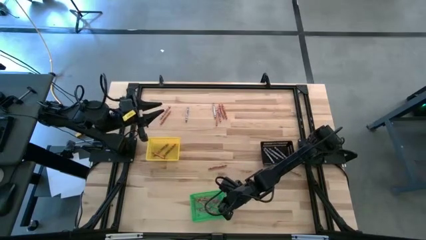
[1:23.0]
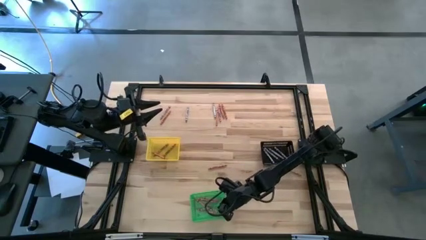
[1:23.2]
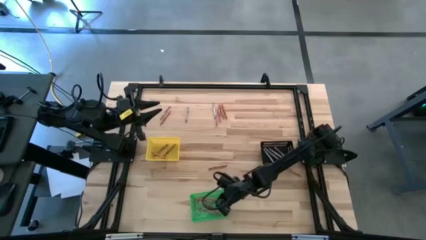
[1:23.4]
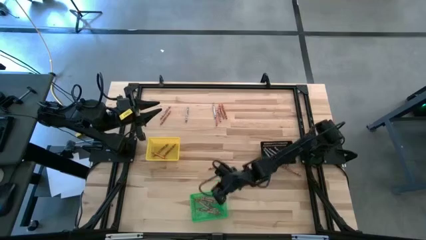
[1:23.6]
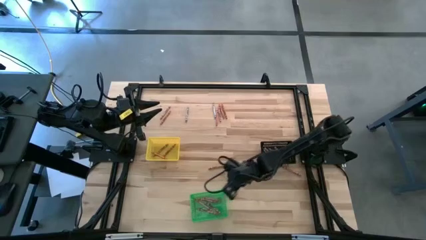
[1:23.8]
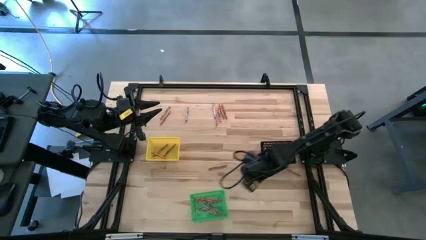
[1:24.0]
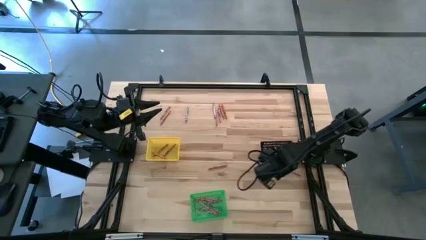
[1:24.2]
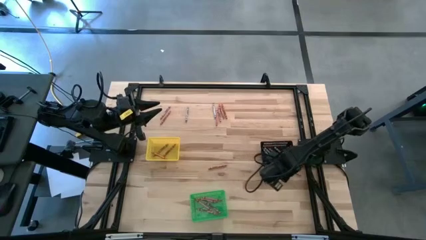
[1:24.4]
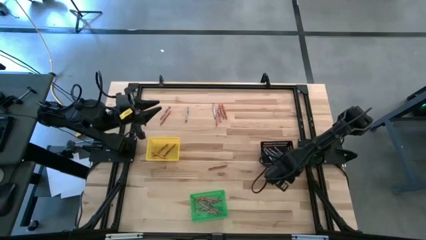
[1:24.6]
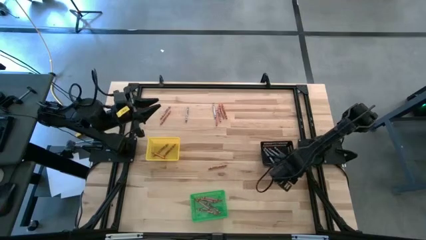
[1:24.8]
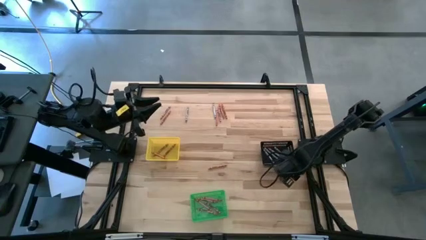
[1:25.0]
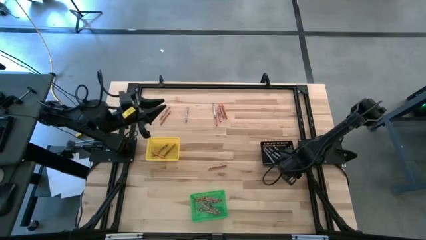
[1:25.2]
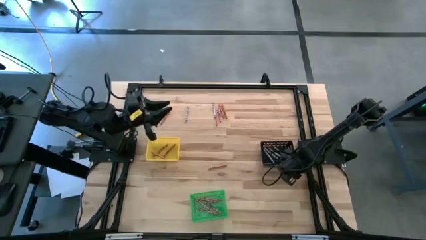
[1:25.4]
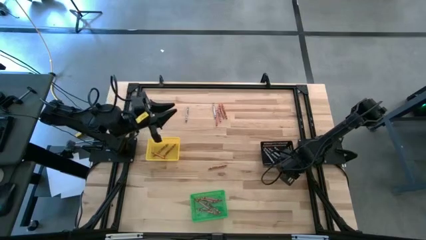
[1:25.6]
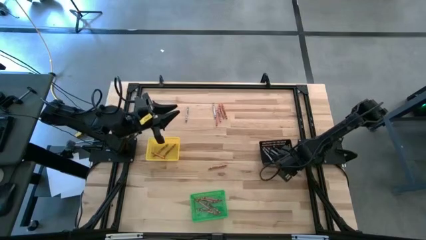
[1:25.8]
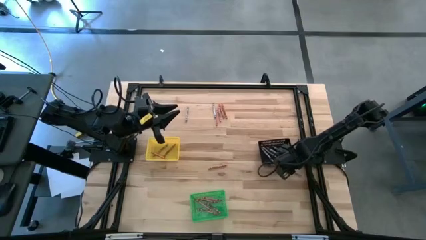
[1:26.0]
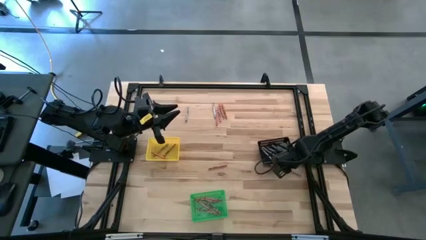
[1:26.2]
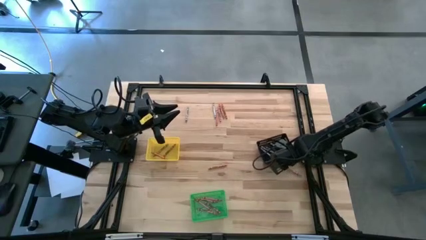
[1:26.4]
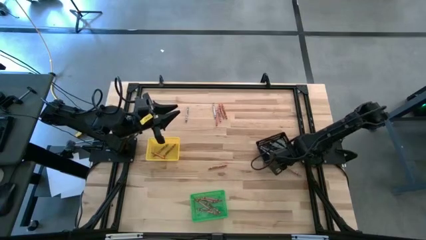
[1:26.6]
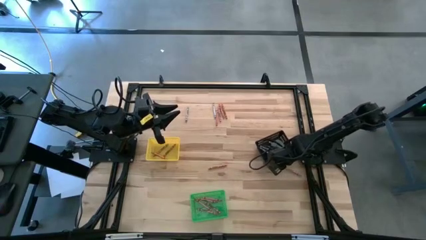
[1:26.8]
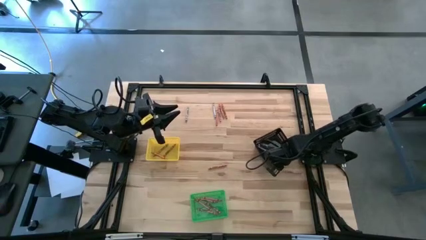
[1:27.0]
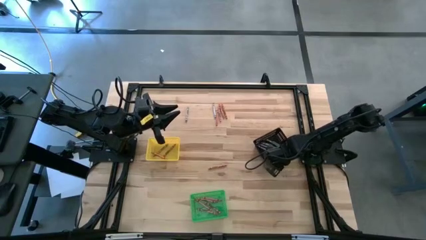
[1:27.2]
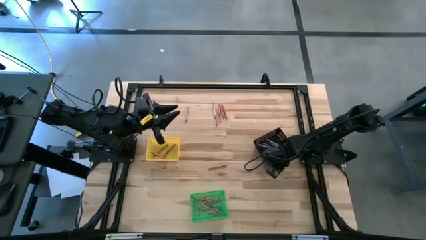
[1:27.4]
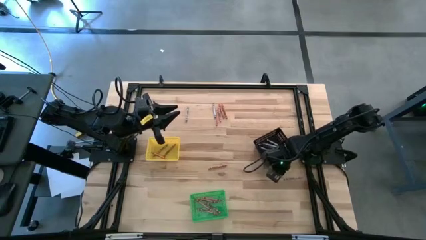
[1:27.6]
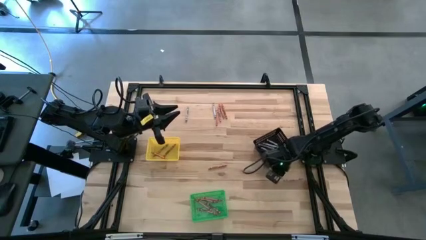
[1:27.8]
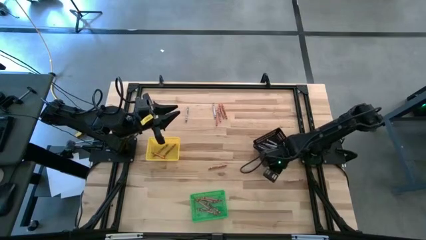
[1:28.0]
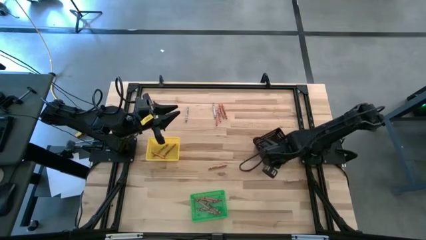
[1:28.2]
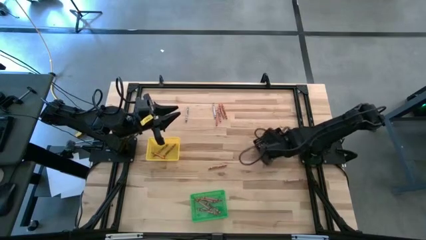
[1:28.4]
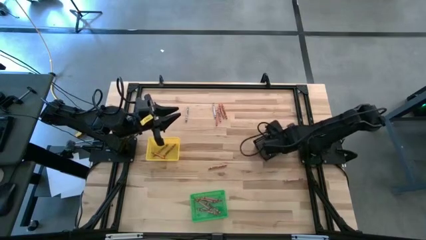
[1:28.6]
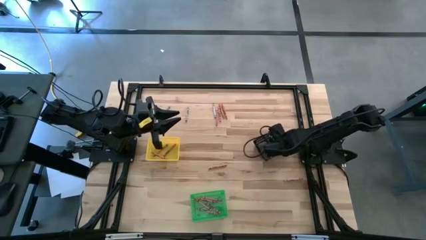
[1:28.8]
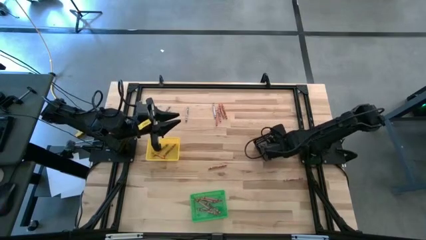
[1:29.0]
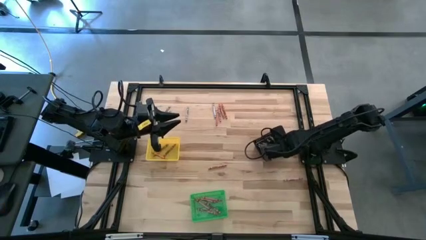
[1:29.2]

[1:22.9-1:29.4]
Task: Sort crayons
Put the bottom gray crayon into the black bin

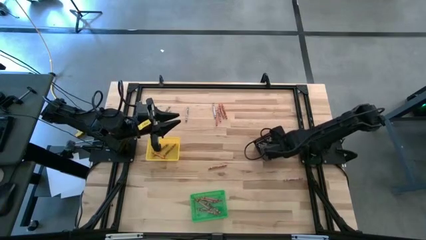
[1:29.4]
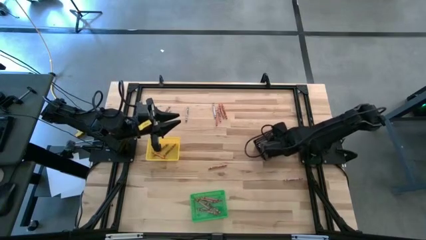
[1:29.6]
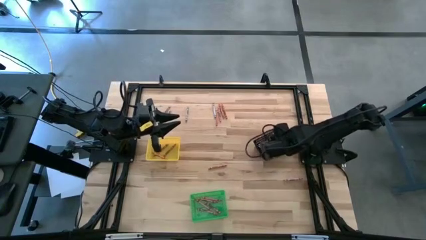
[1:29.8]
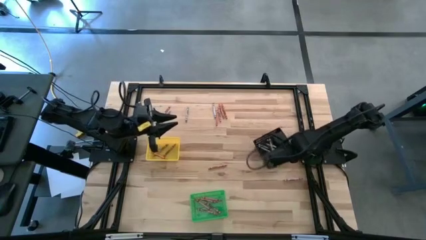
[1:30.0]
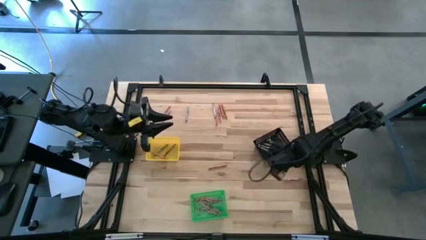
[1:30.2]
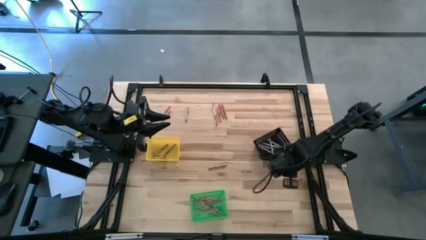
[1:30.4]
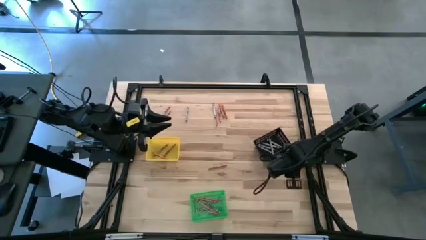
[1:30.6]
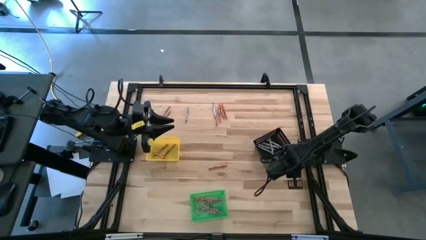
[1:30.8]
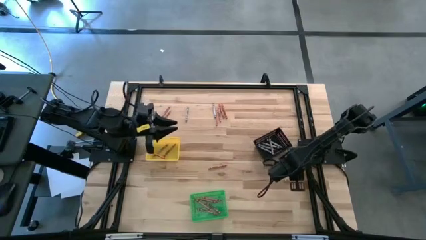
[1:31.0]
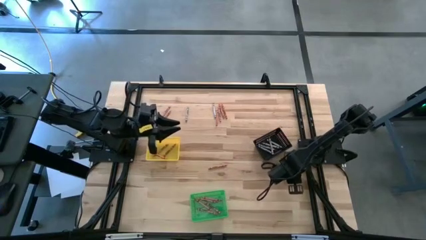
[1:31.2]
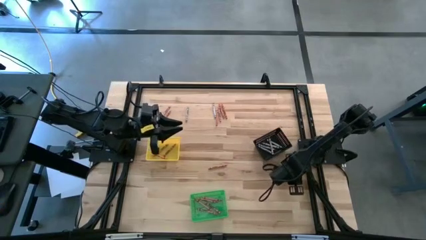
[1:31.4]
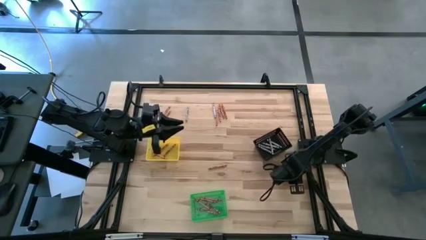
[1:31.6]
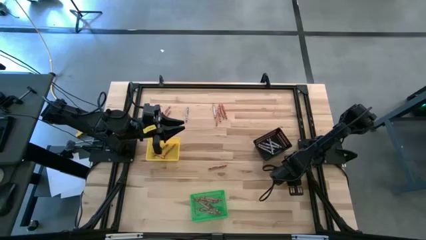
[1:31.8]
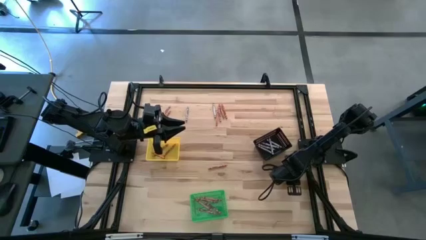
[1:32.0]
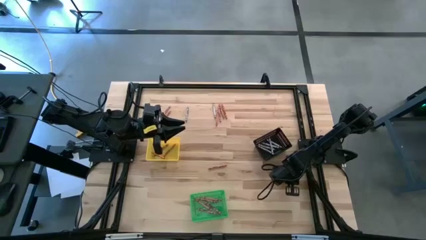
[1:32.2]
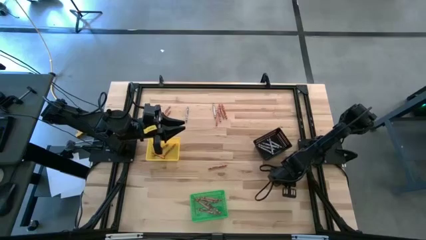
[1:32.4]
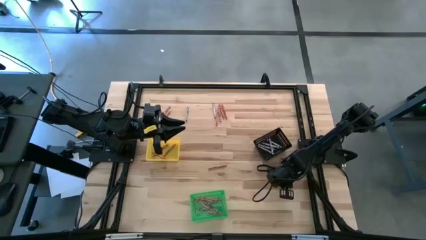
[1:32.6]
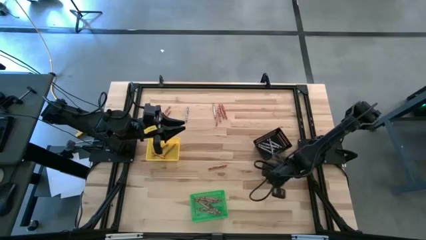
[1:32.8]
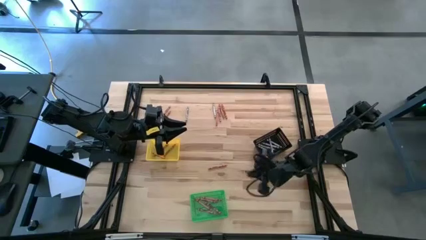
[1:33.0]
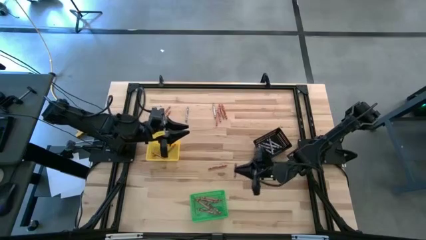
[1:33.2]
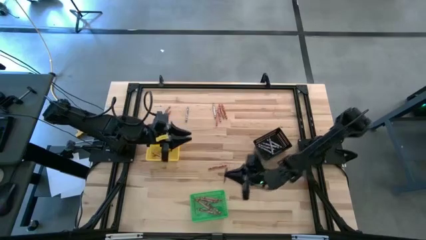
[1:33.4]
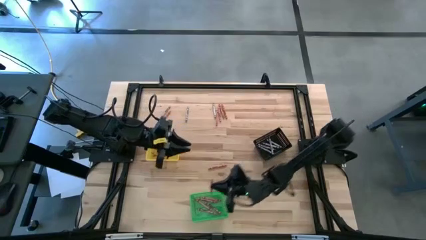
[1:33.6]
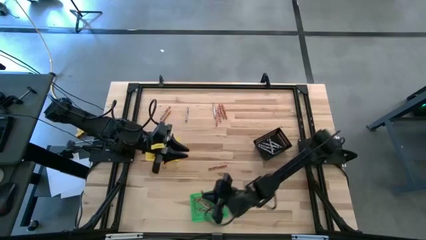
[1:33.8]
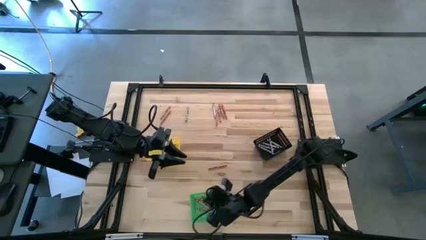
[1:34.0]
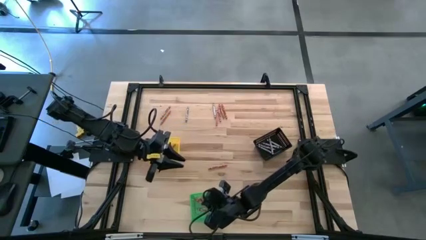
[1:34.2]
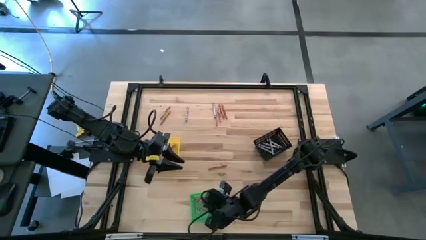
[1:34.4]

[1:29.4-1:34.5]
Put the bottom pink crayon into the green bin

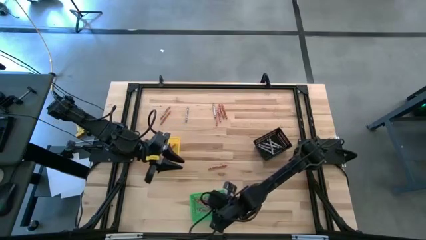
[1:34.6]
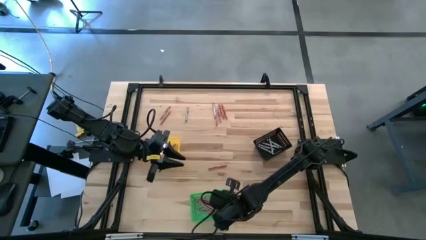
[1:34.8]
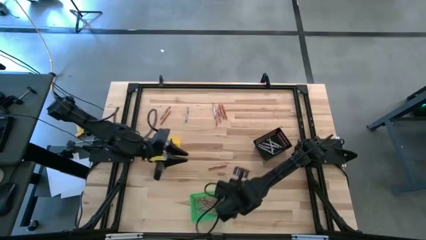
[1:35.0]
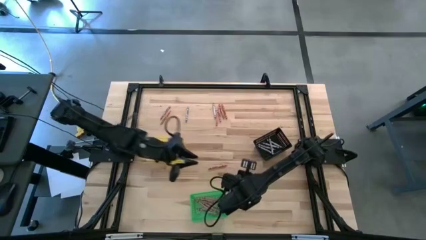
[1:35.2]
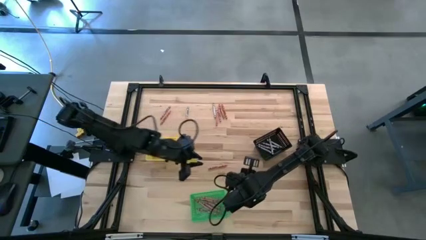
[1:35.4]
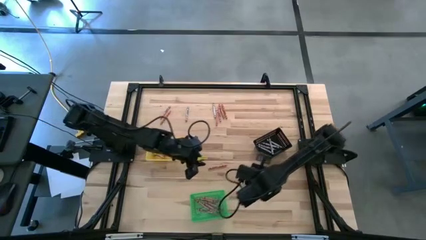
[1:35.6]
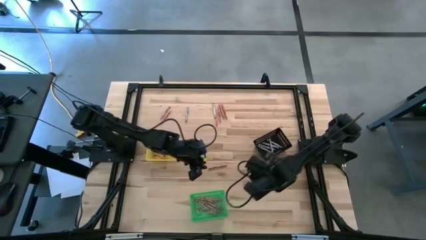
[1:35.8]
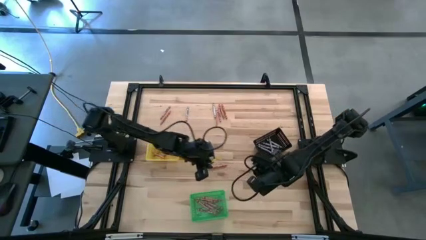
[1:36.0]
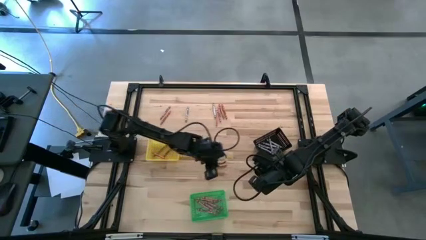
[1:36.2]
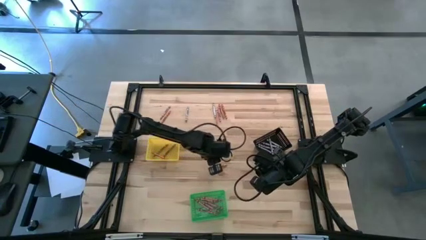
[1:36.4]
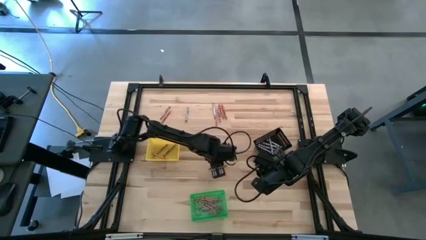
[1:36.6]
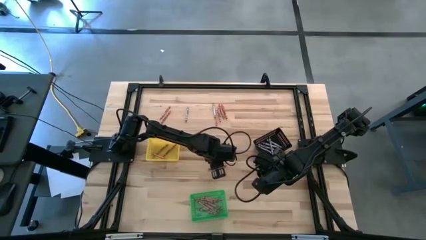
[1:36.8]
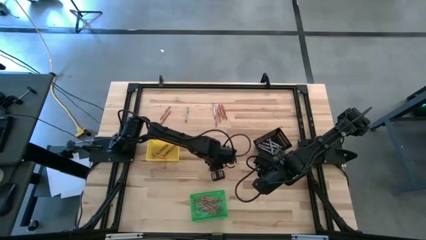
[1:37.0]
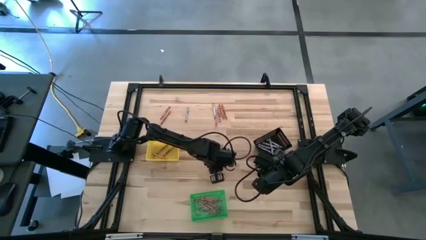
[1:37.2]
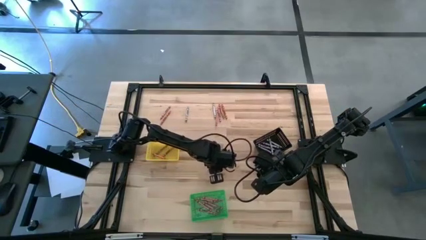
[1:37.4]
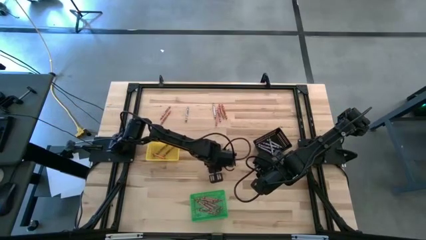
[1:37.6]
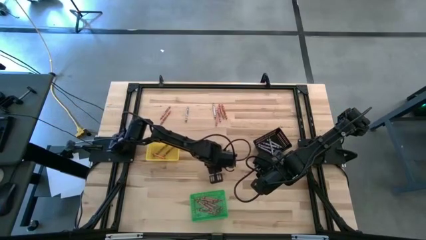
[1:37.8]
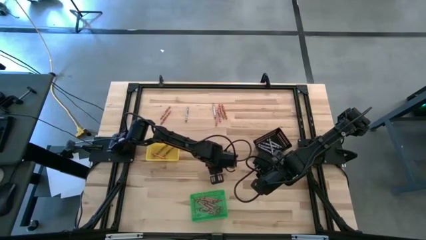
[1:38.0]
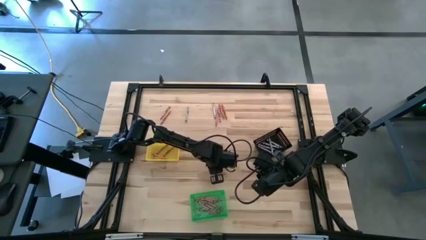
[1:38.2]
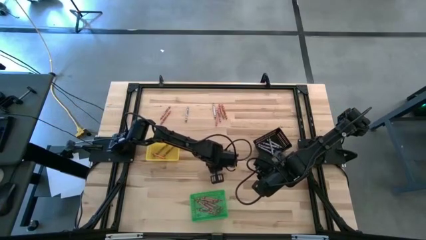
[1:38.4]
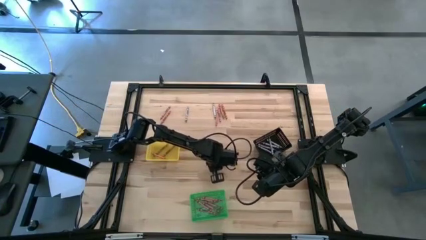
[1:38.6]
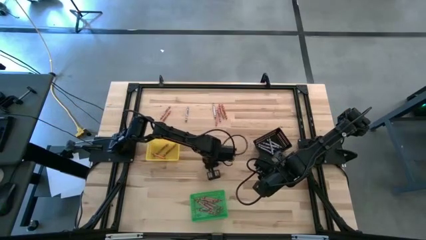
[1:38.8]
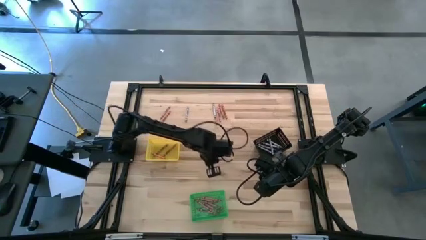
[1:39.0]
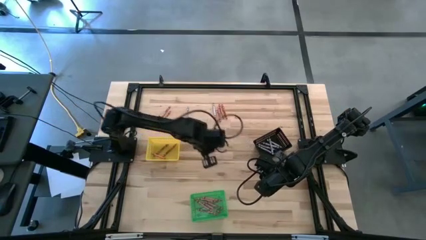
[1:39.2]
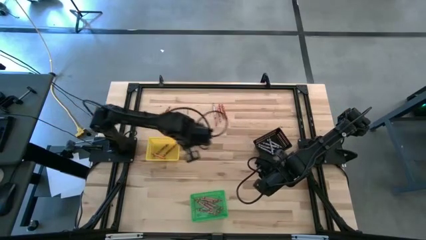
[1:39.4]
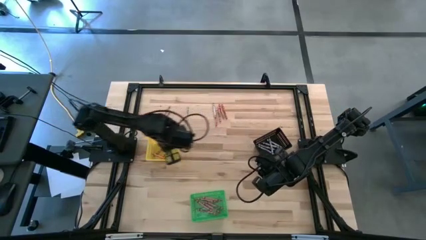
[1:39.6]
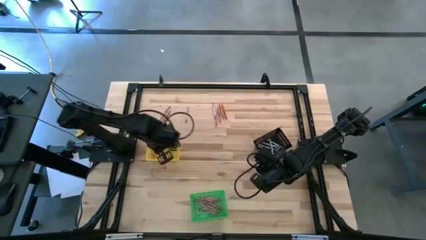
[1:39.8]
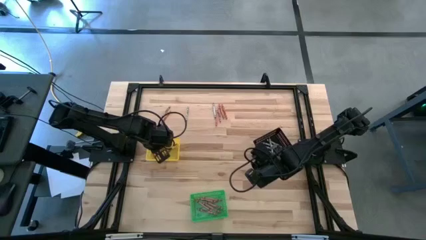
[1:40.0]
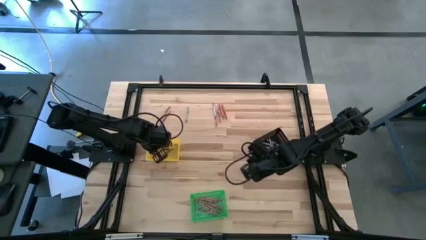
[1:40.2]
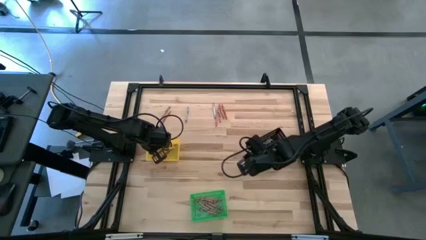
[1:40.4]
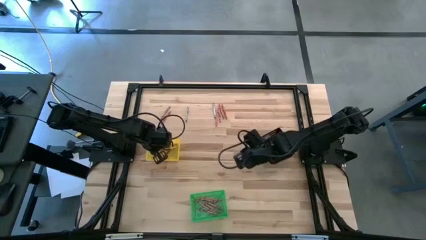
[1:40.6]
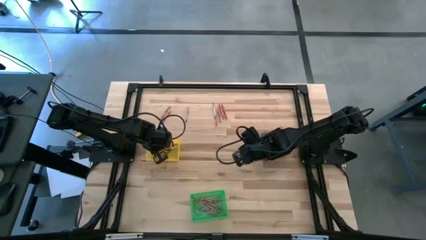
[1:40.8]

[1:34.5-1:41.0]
Put the orange crayon into the yellow bin
